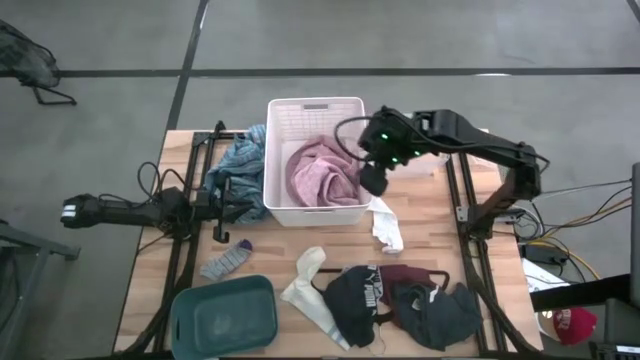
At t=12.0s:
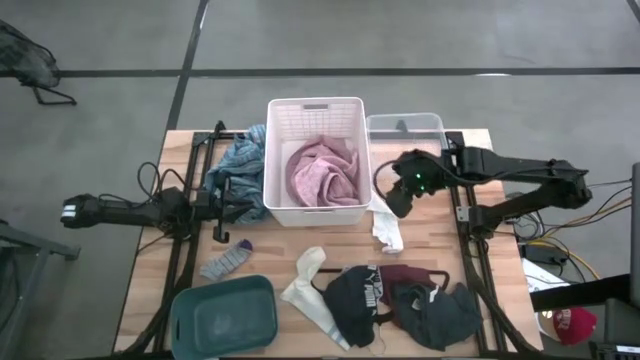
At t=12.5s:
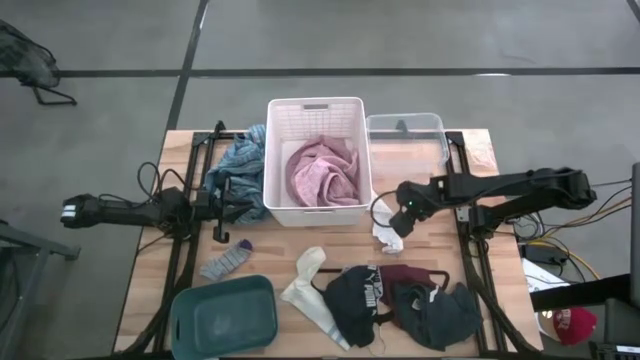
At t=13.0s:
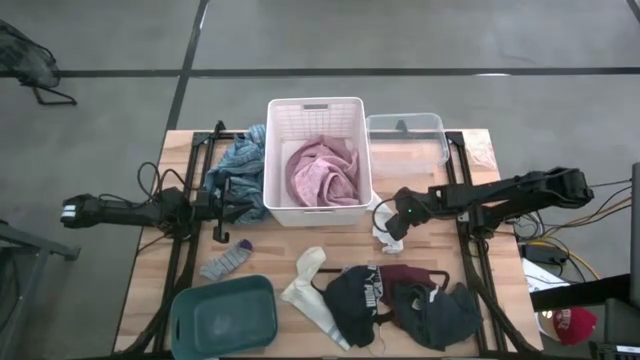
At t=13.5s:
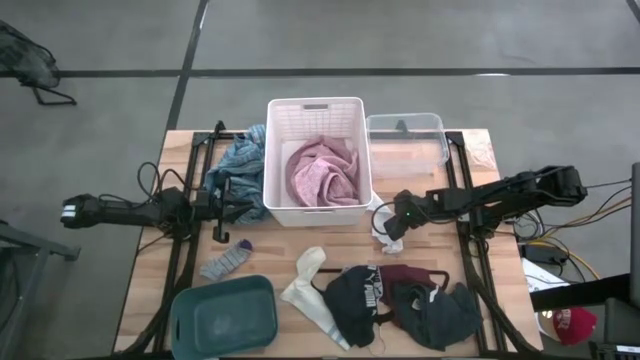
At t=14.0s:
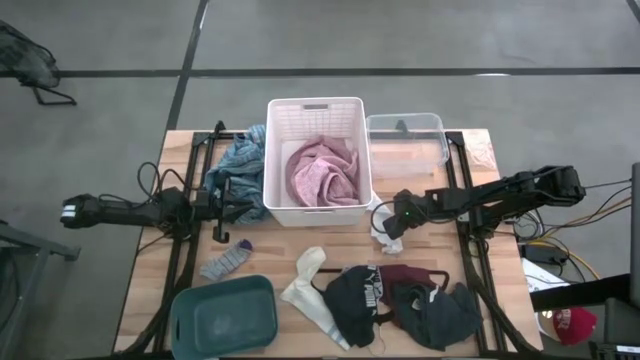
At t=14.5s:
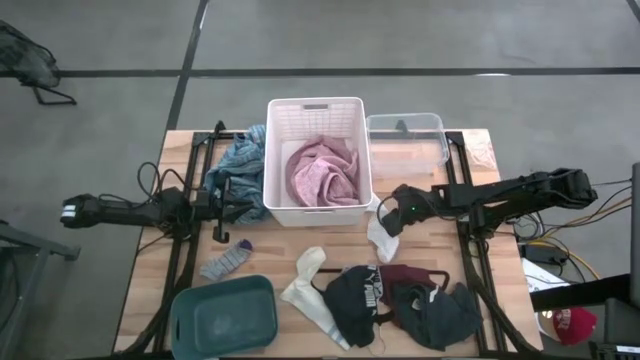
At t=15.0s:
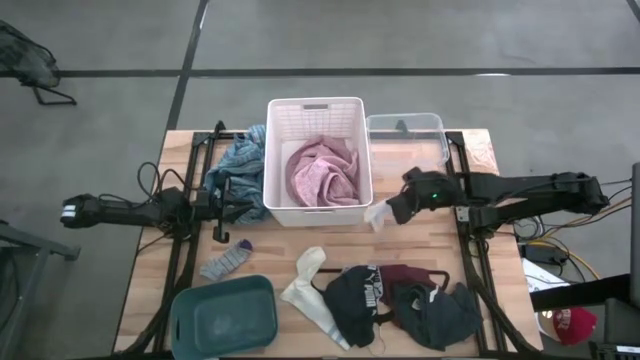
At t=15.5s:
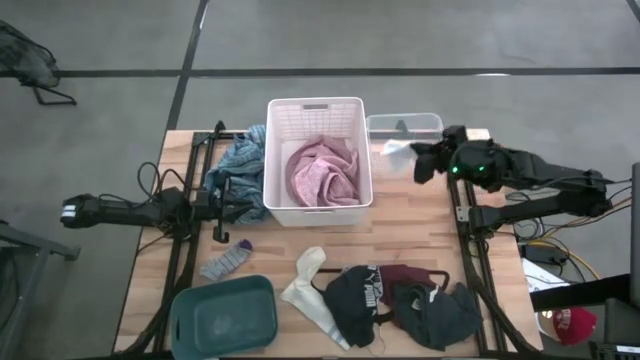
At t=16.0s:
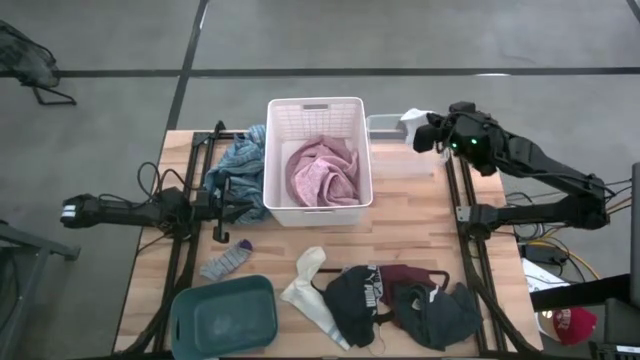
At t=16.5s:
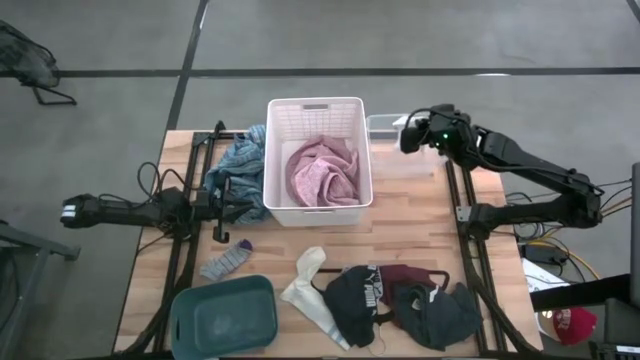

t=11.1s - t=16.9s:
Task: Pick & Place Cloths
Put the top white sock into the transparent container

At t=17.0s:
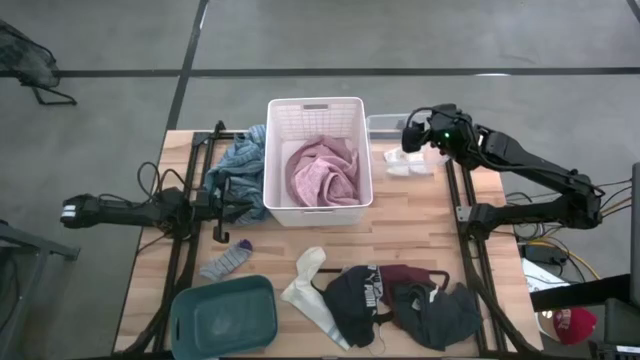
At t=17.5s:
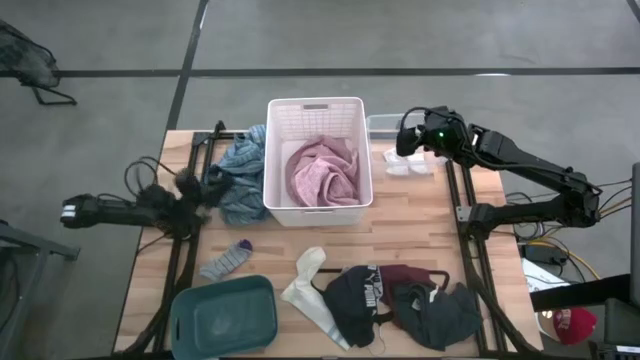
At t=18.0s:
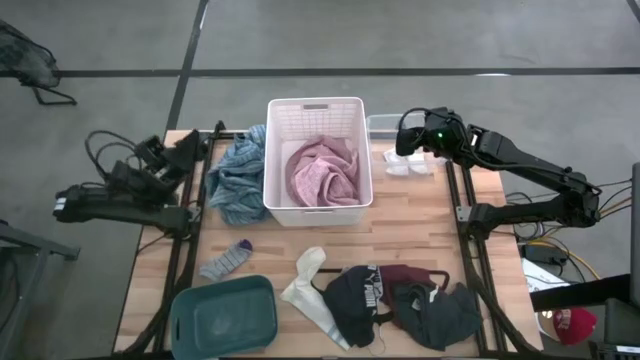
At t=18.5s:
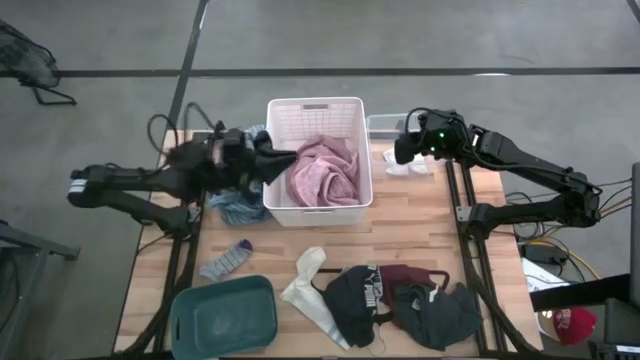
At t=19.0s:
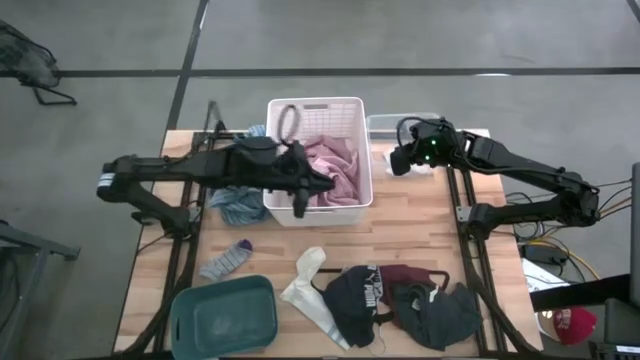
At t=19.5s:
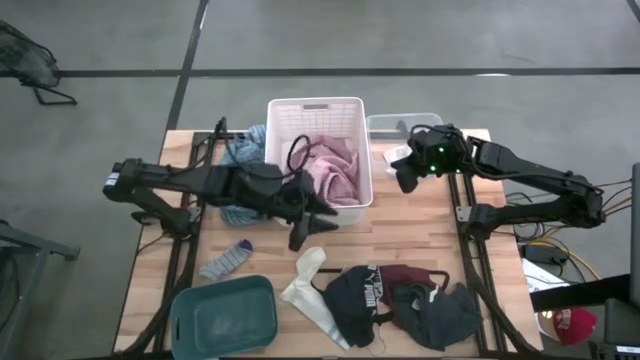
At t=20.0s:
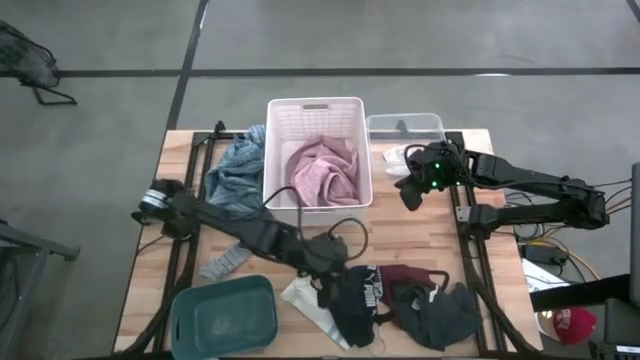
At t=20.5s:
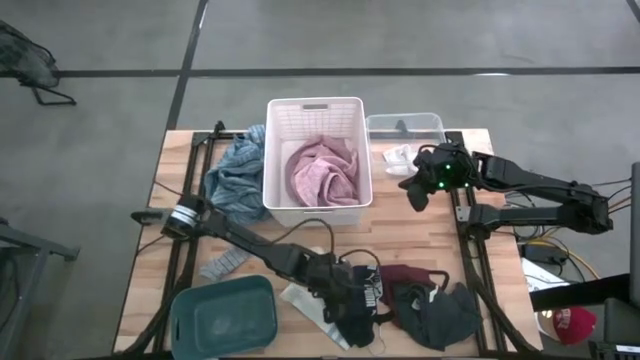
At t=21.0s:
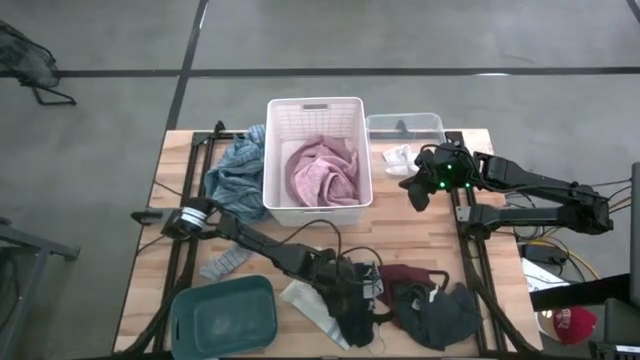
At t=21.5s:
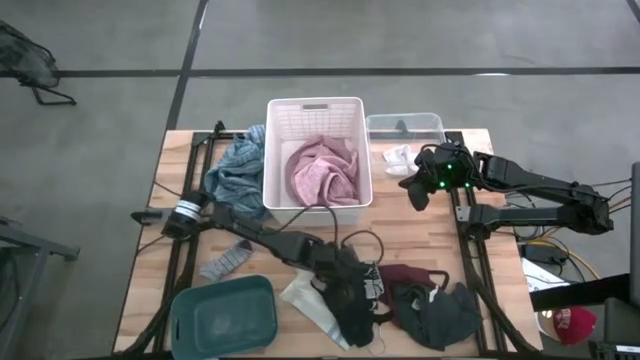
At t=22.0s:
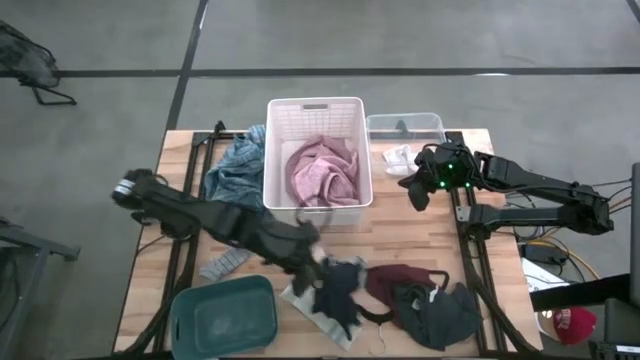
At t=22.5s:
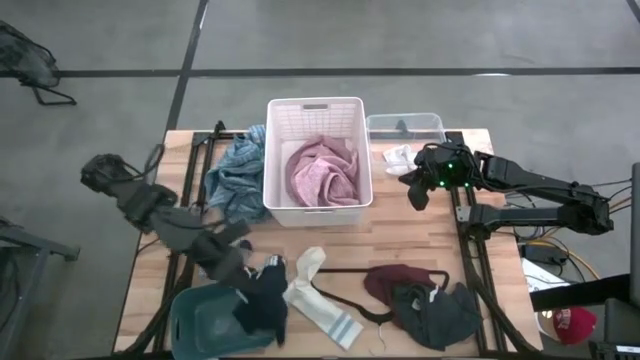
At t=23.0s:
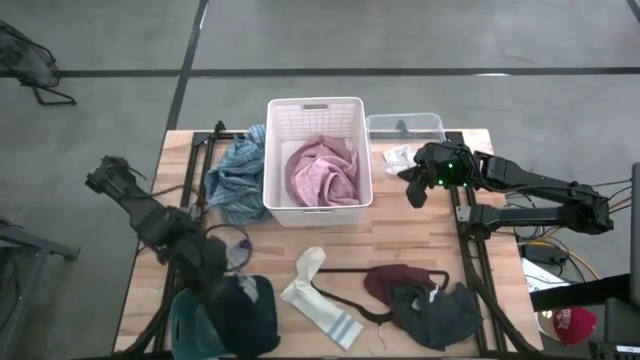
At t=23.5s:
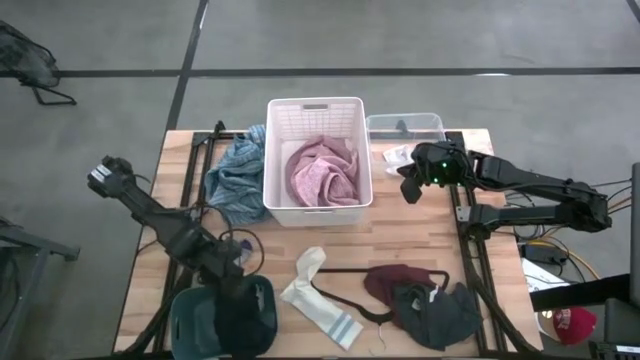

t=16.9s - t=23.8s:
Put the blue boxer shorts into the green bin

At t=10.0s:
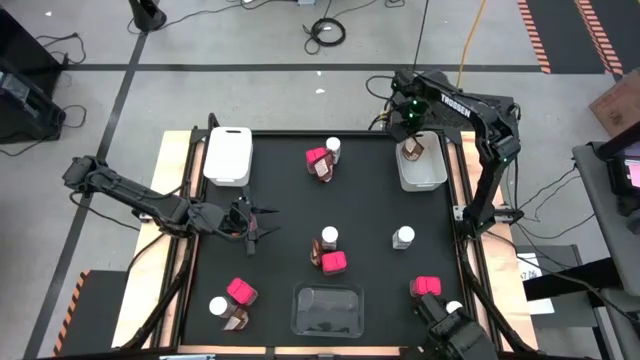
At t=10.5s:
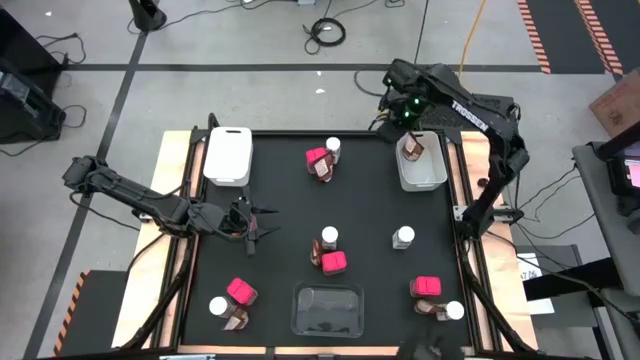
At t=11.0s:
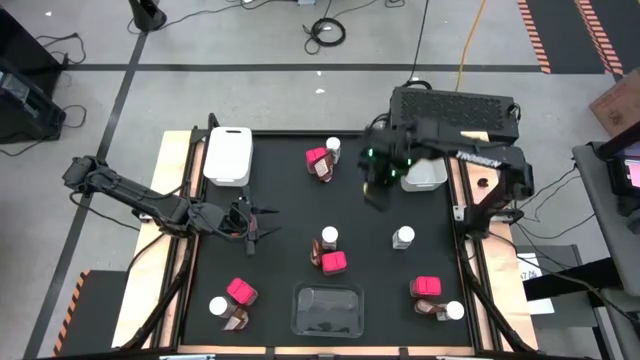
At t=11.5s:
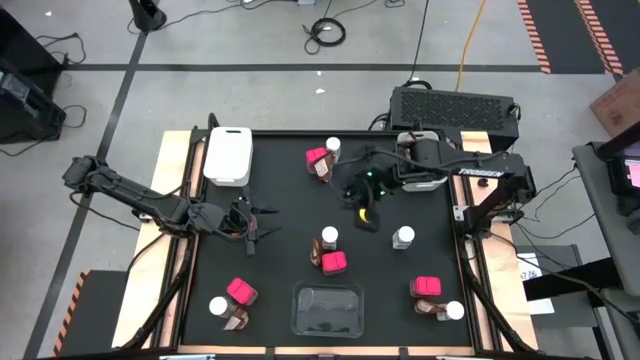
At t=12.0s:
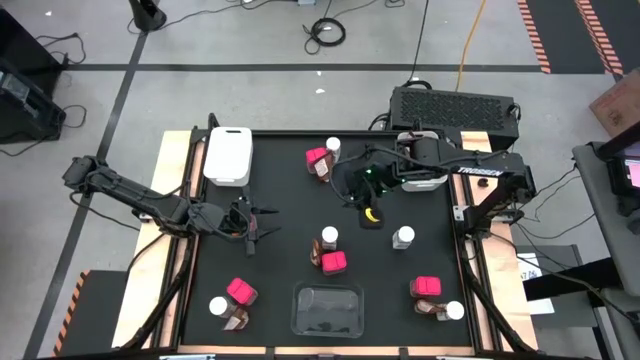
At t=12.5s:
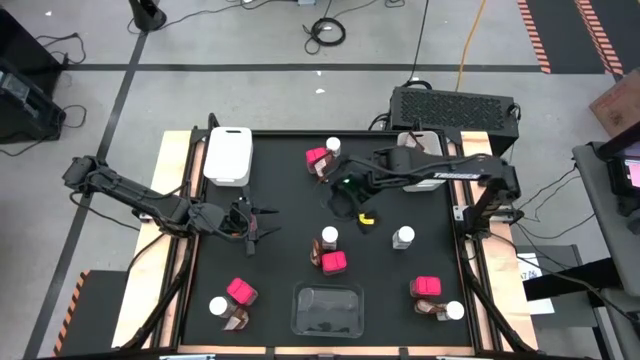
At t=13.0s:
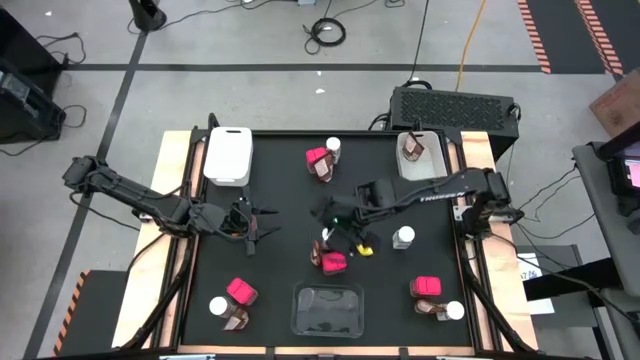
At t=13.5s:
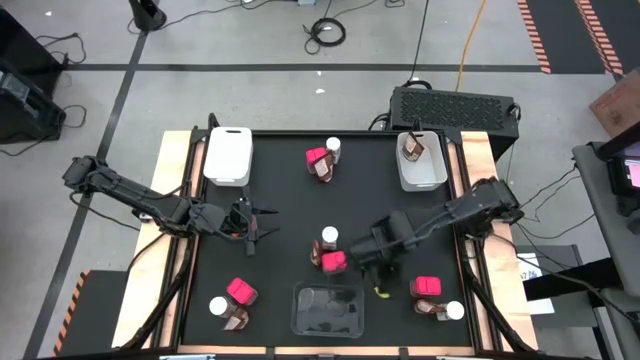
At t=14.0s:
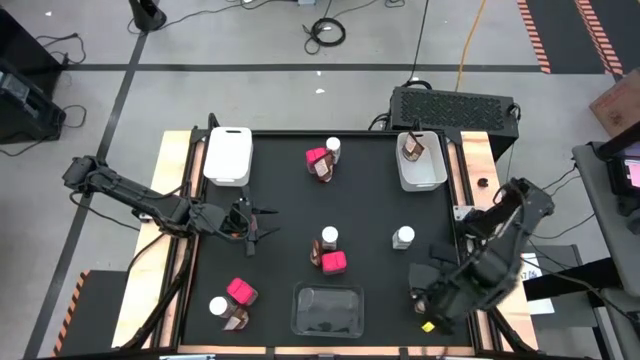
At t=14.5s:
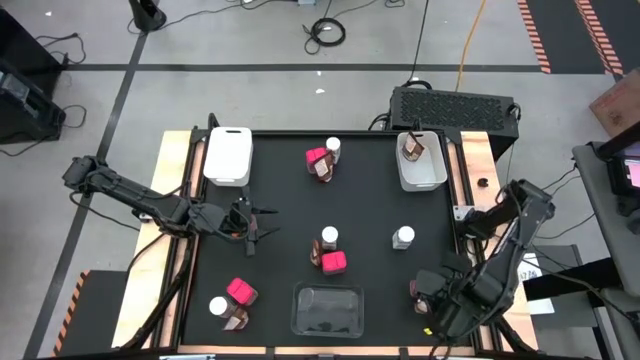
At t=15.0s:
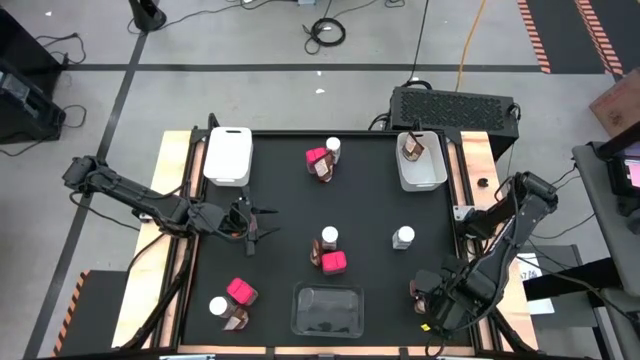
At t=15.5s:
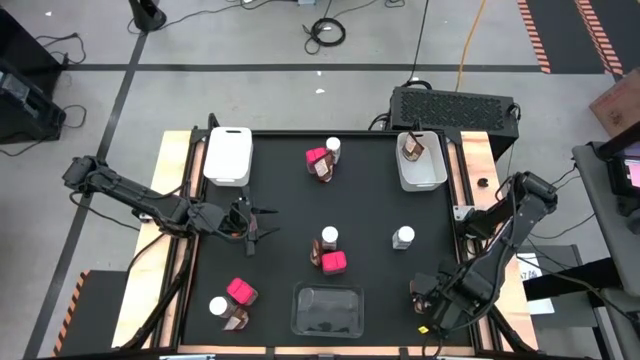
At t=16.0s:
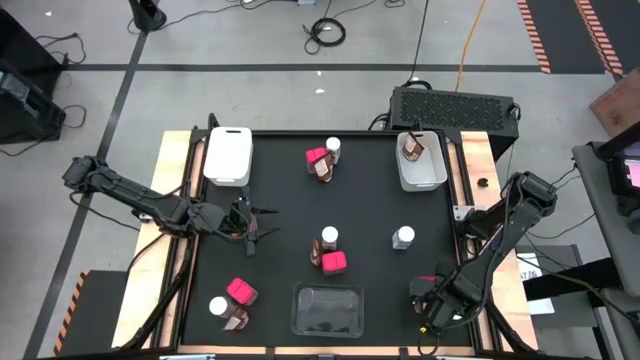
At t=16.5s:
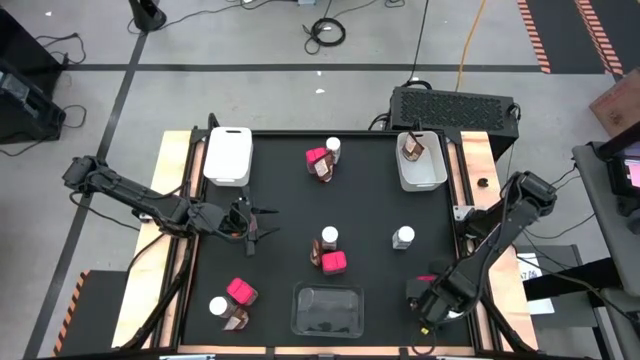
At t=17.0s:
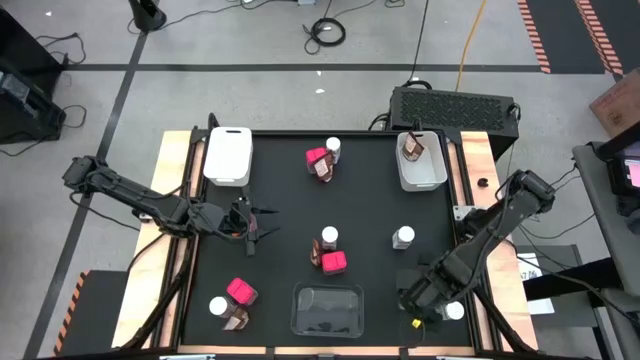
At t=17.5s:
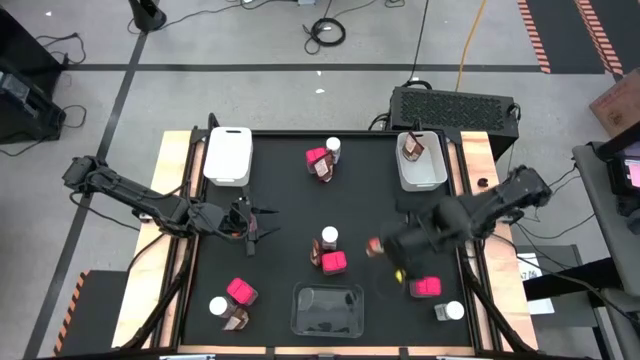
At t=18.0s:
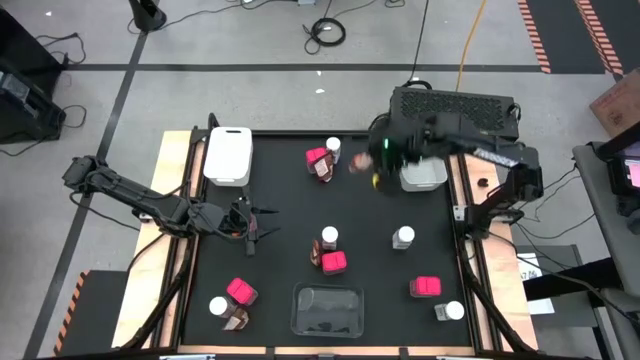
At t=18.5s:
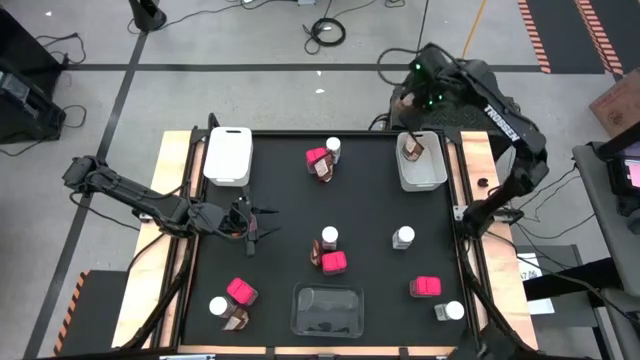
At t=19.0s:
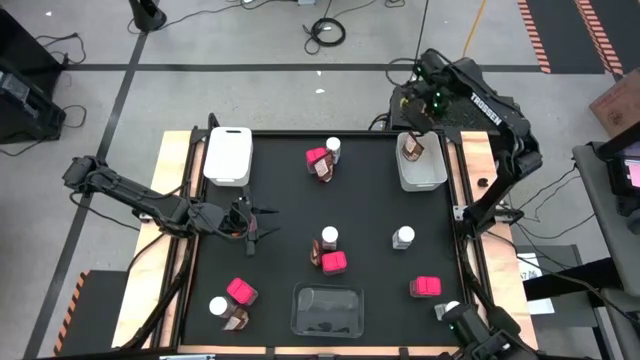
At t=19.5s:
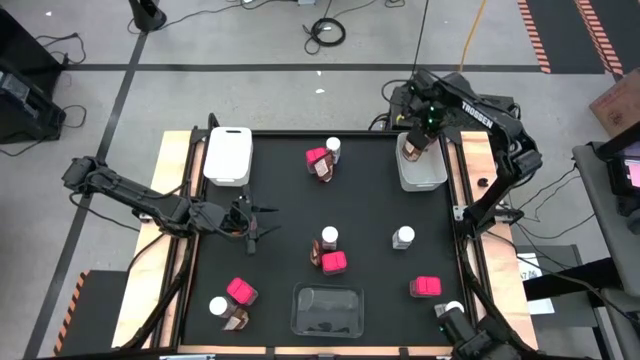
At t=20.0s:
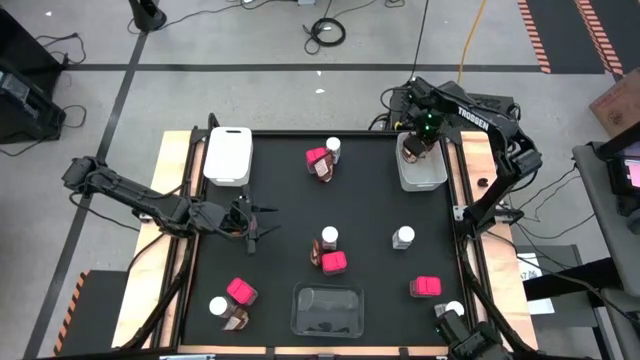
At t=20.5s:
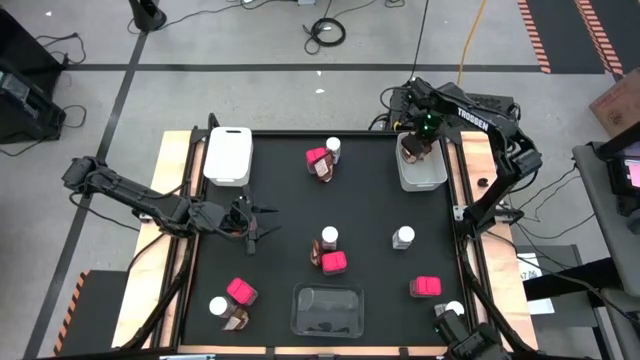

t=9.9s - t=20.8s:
Task: Sort spices by type
Put the brown seasoning pack into the right white bin
